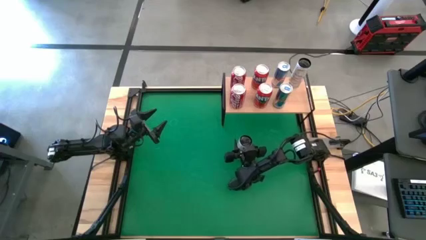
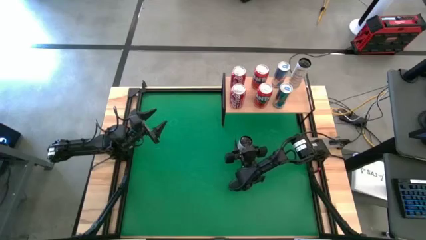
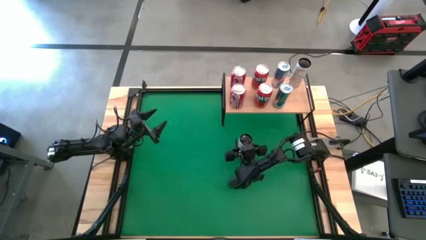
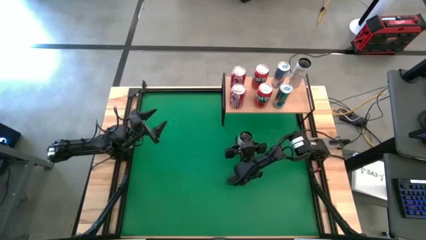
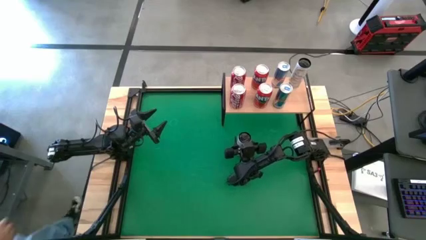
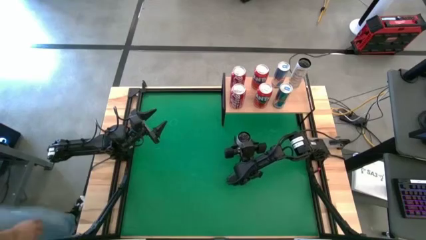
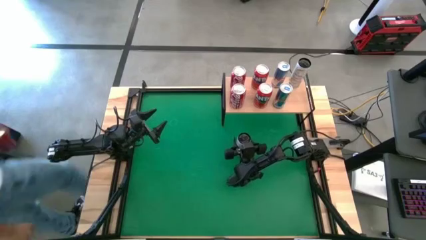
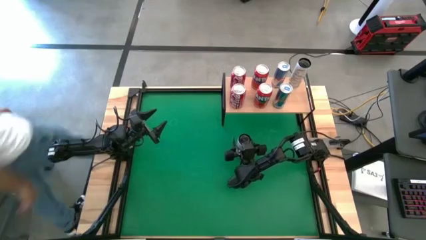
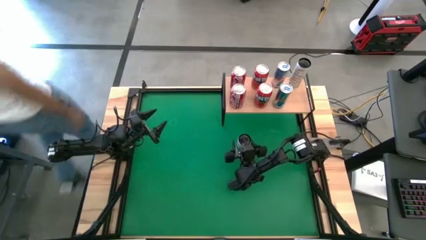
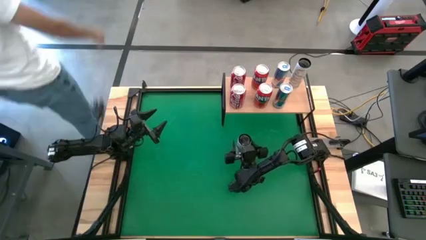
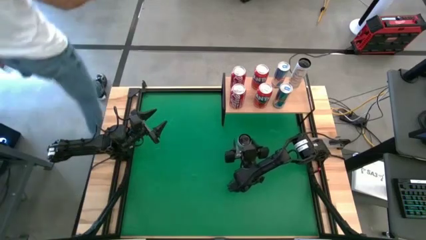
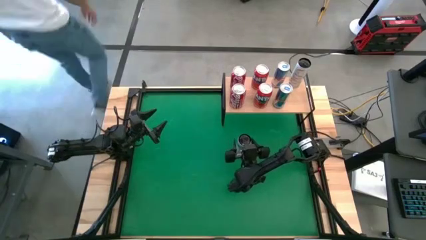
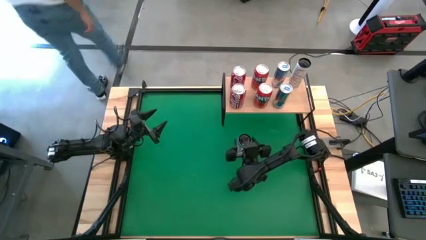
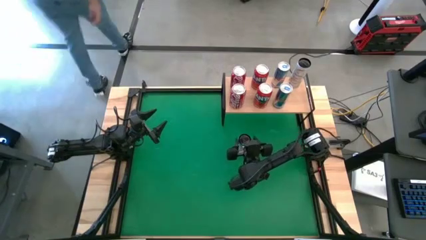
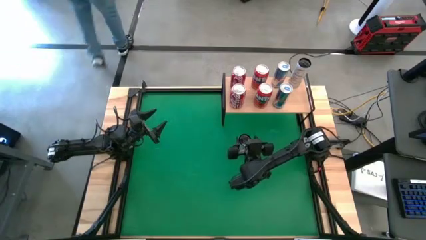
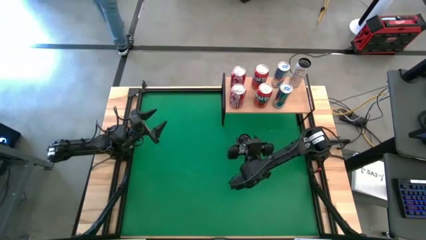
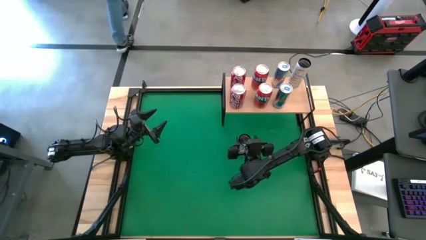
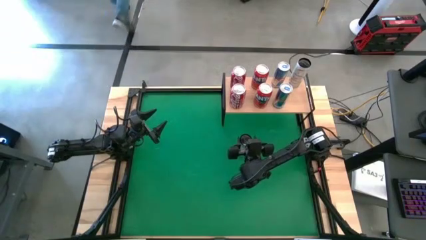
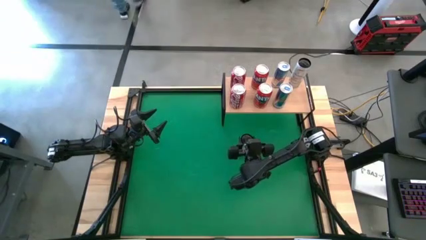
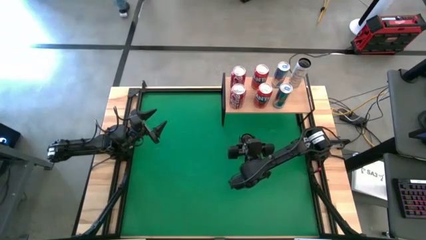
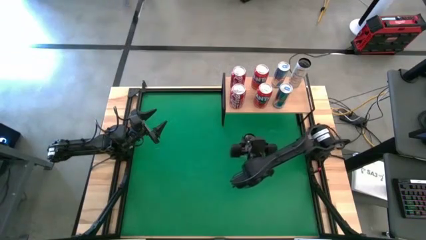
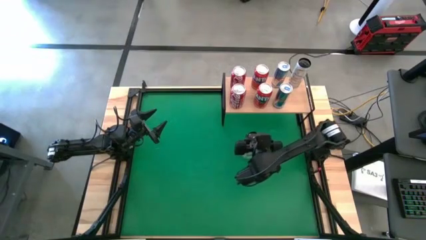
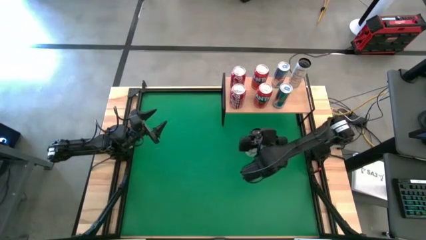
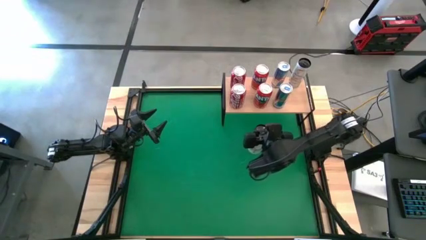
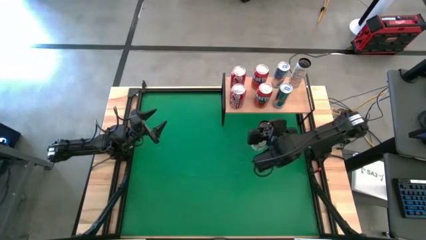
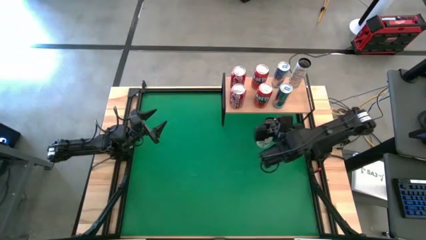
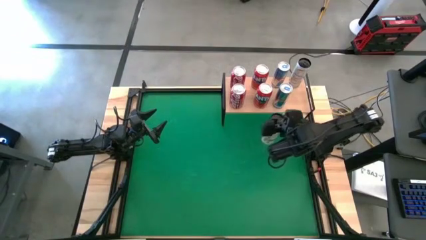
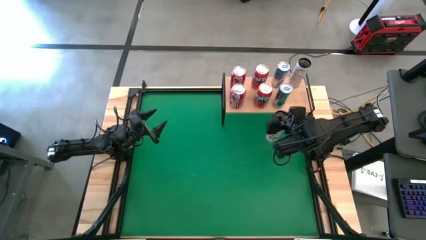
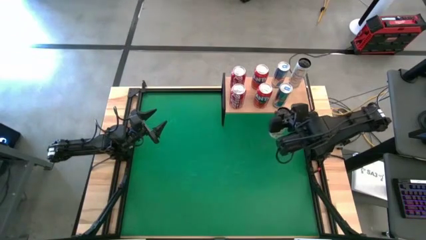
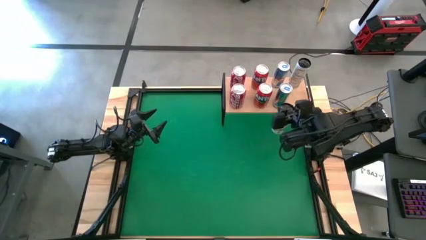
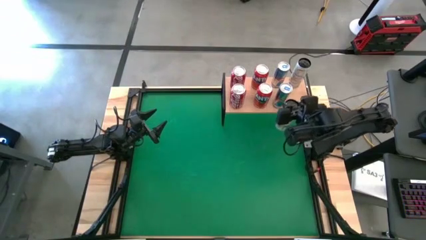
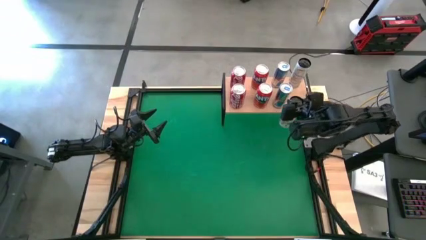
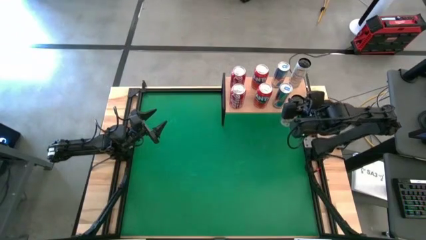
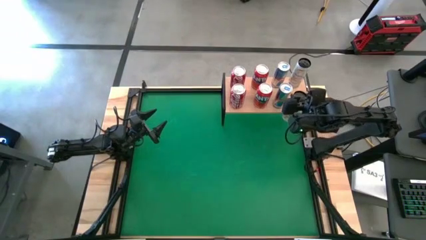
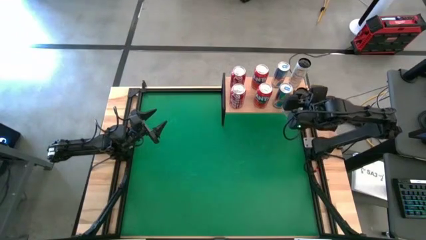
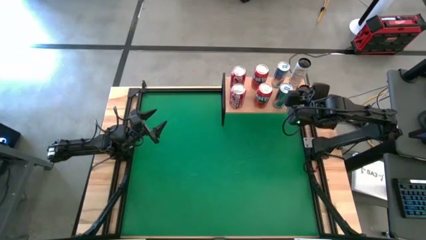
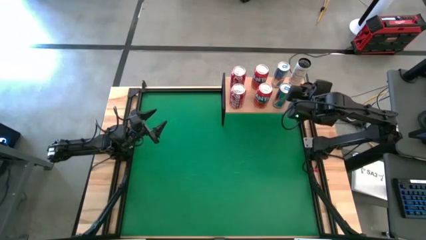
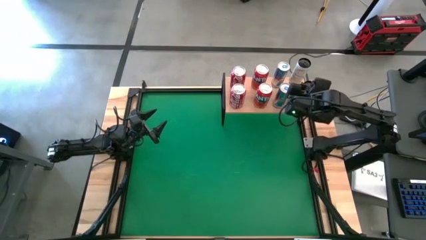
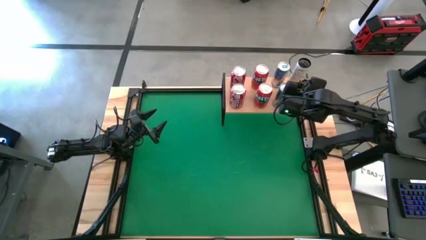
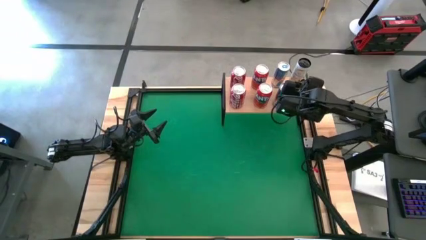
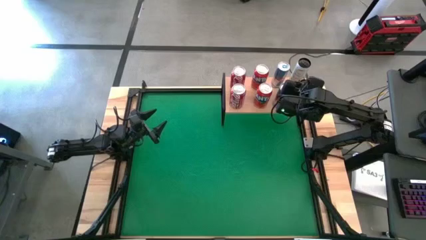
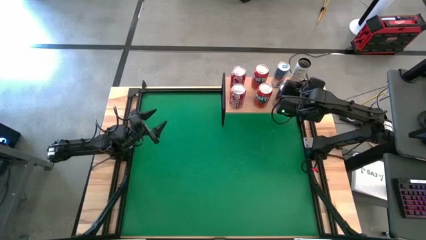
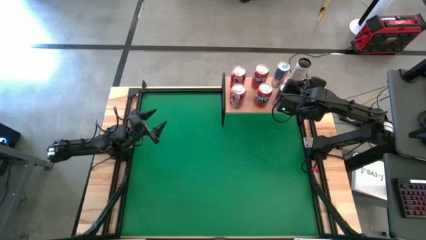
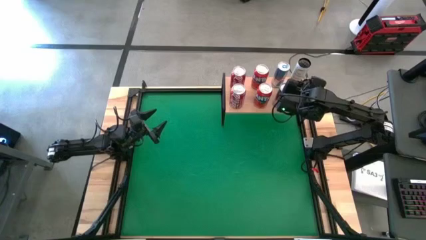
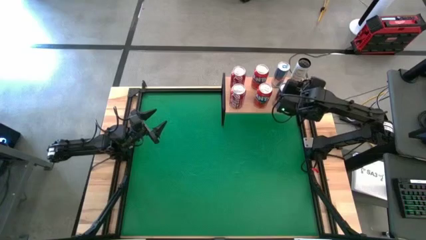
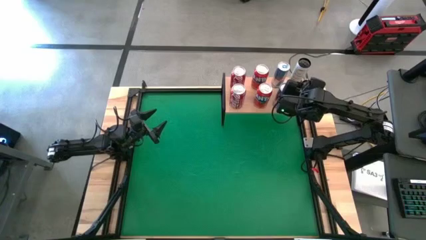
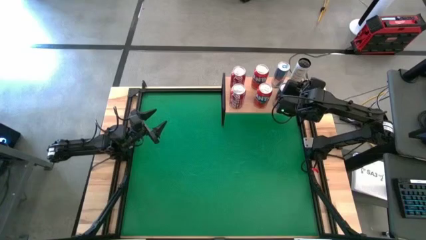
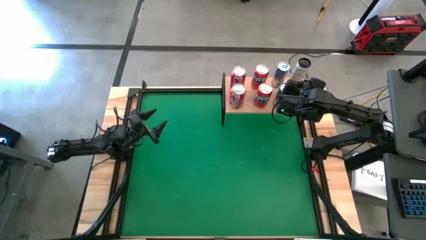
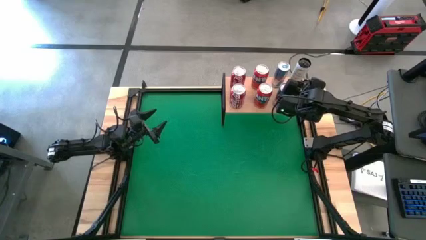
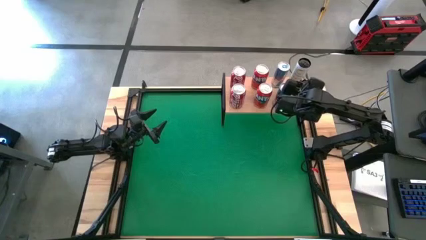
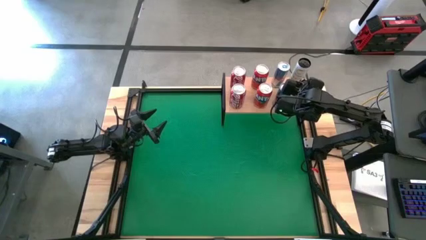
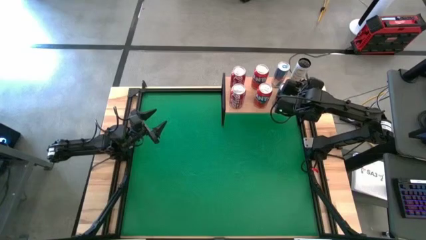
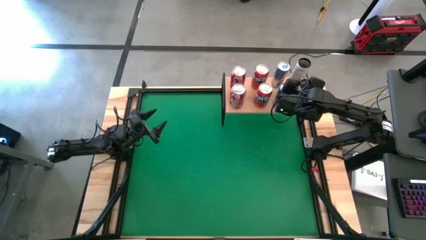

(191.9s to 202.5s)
Task: Place canned beverage on shelf
Put the white yellow soda can on the shelf aligned with the other white yellow soda can

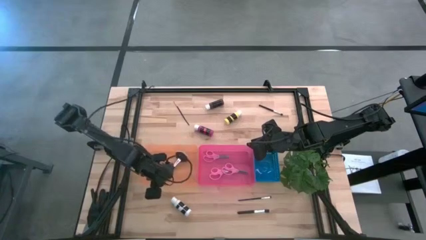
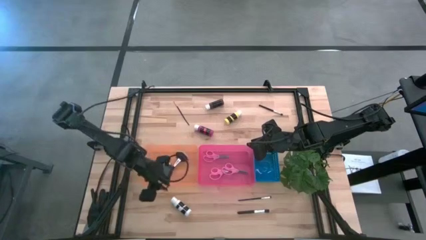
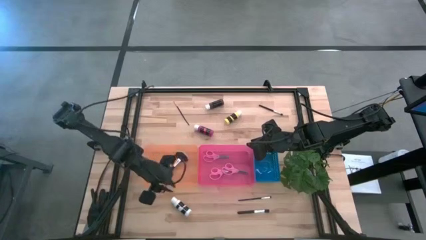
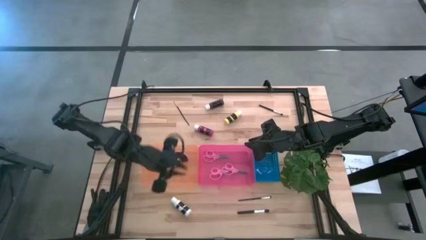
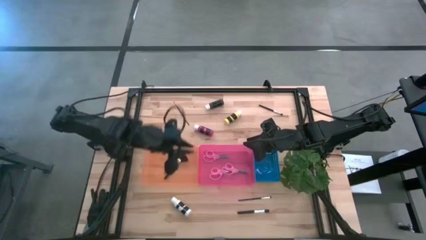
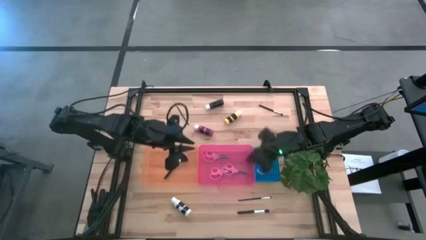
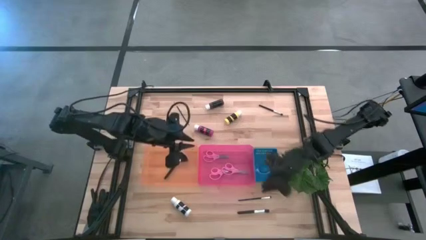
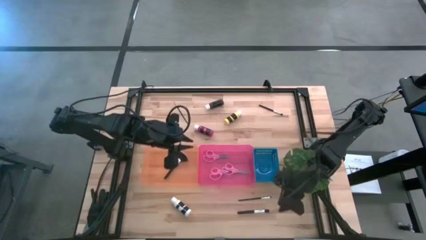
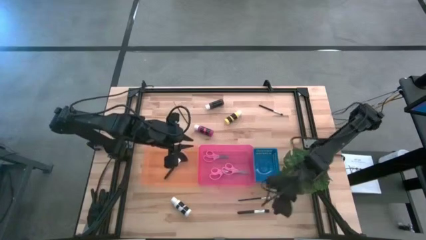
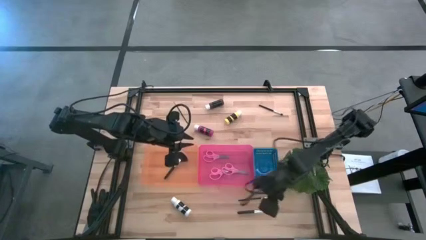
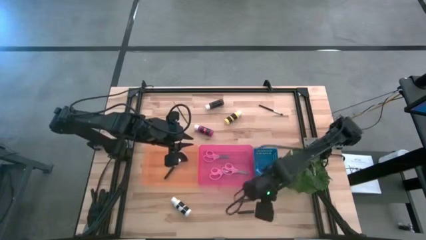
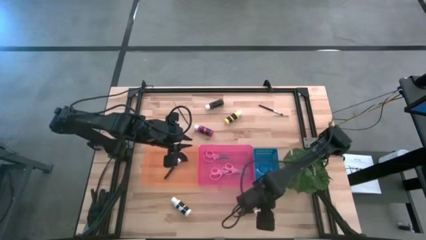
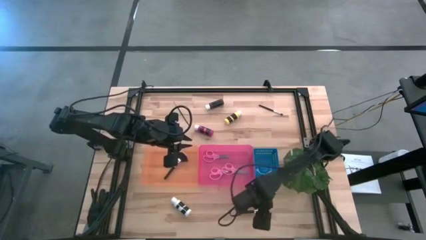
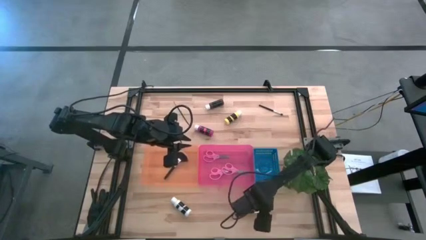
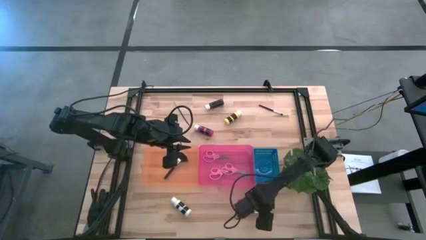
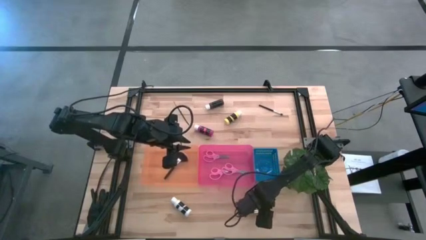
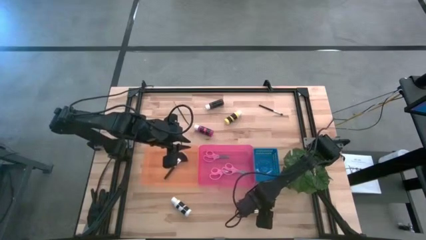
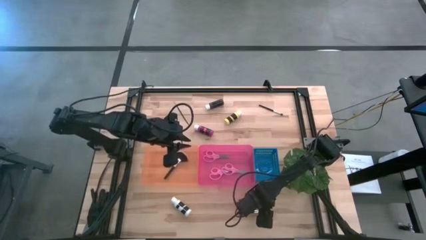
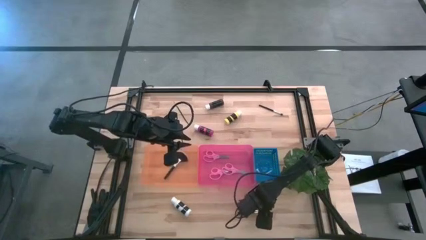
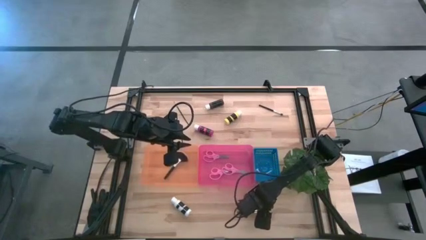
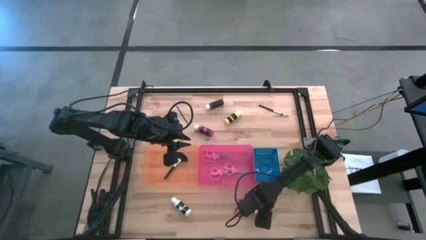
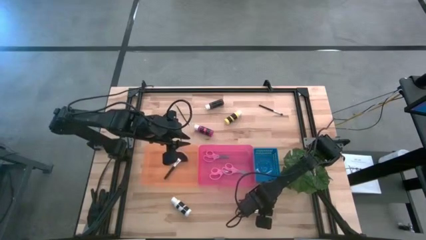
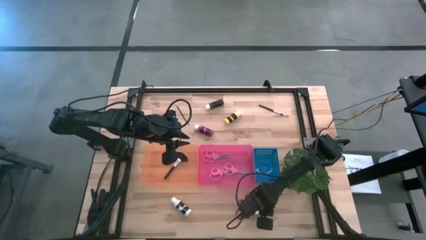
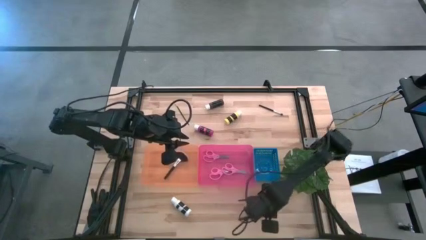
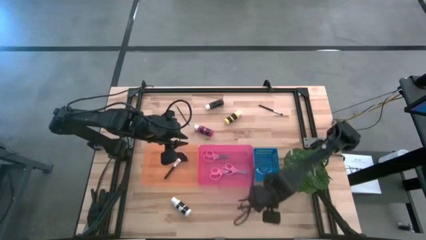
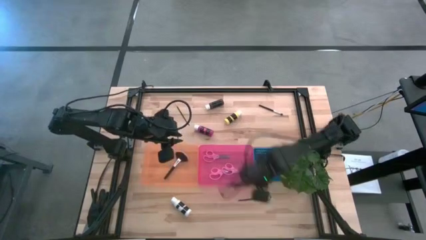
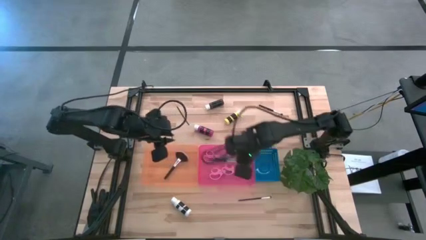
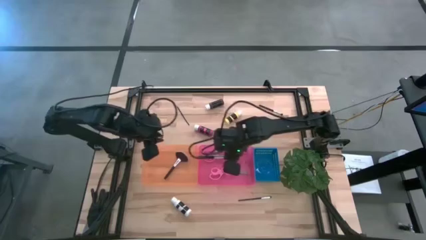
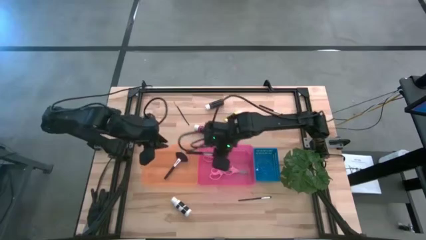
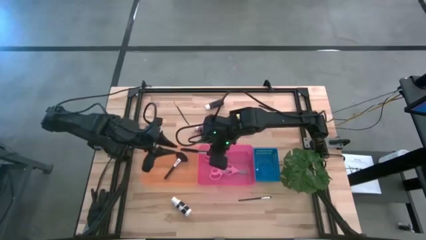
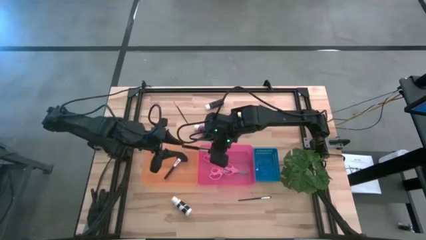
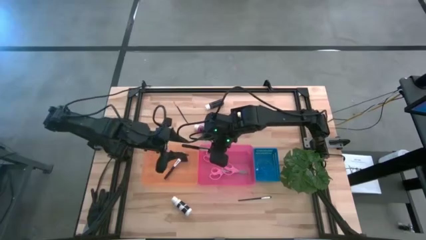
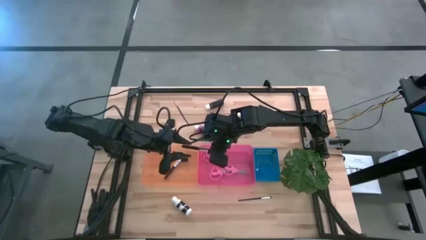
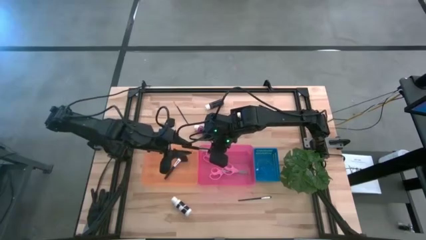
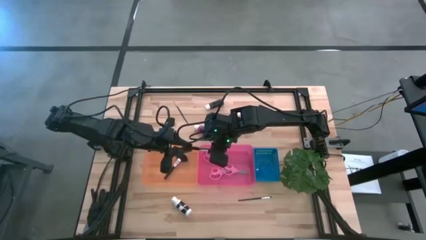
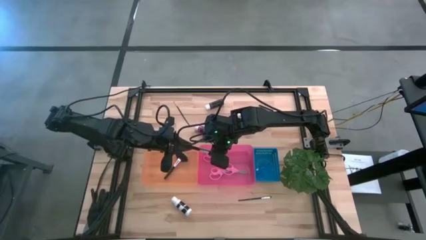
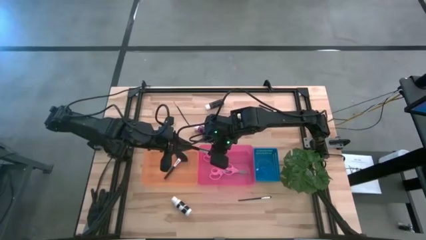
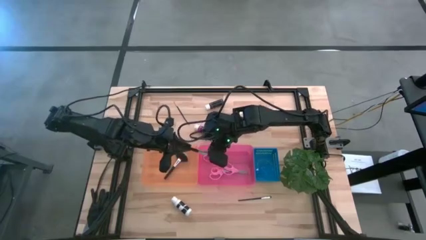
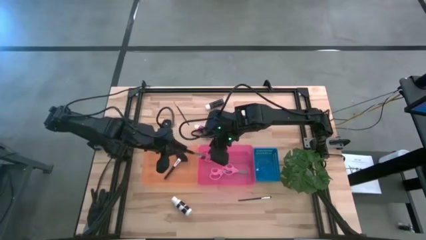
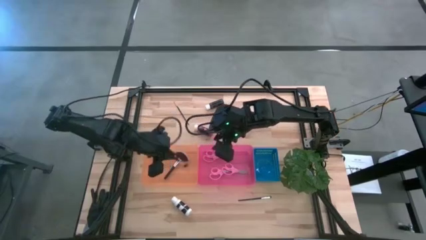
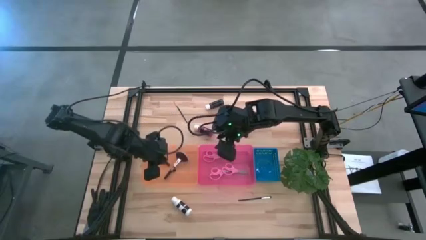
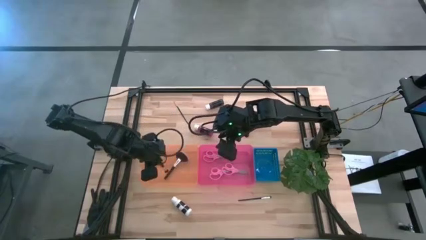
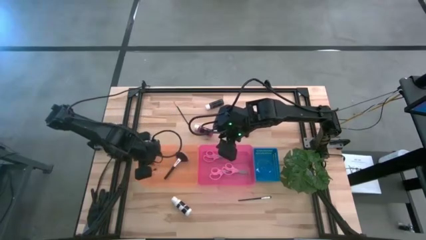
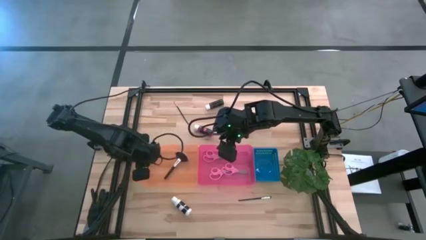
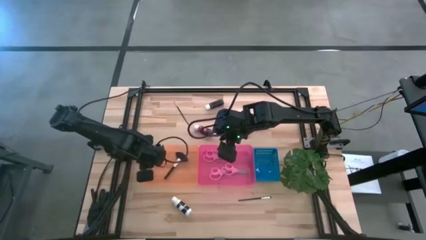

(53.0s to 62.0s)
Task: Pick & Place Paint Supplies
Put the silver blush brush into the orange bin
